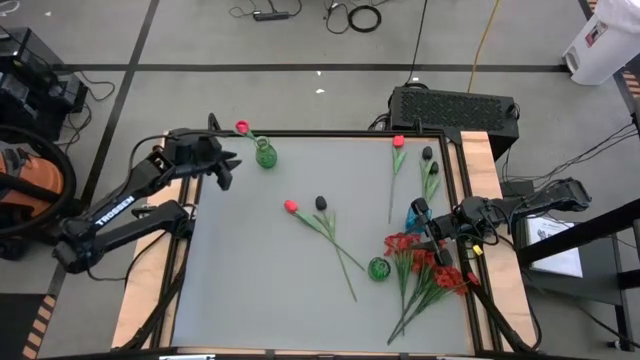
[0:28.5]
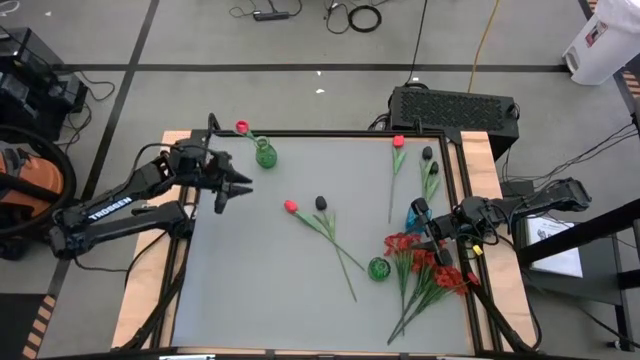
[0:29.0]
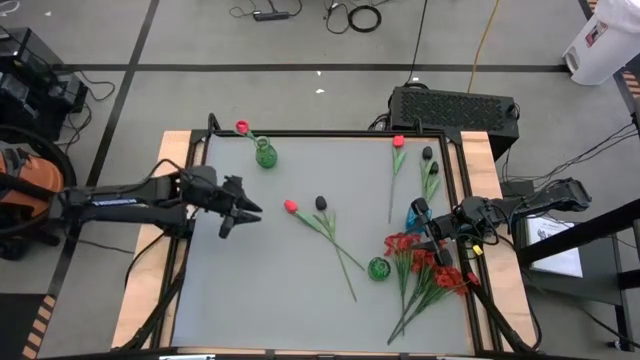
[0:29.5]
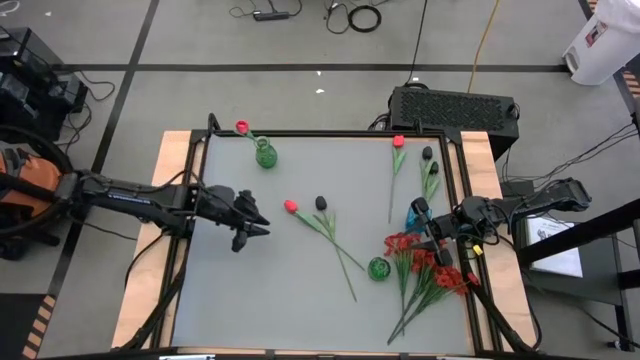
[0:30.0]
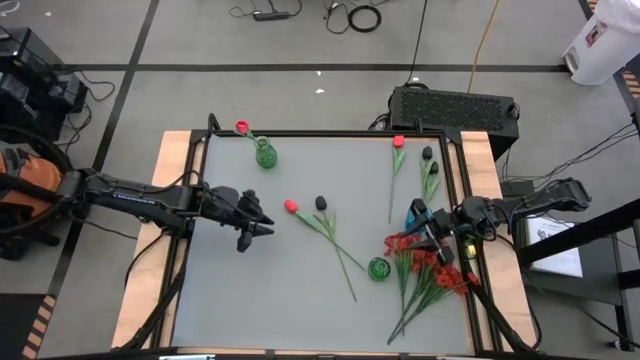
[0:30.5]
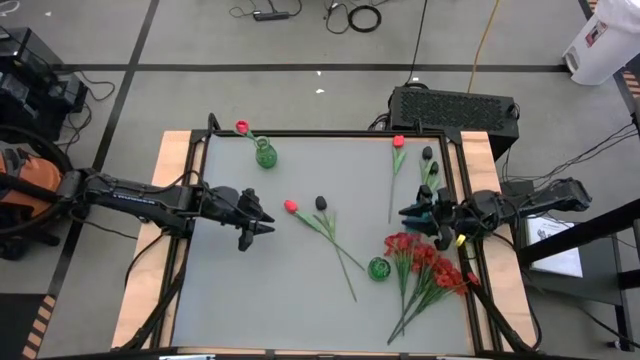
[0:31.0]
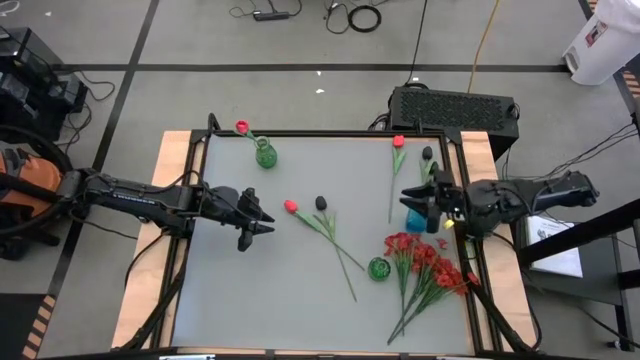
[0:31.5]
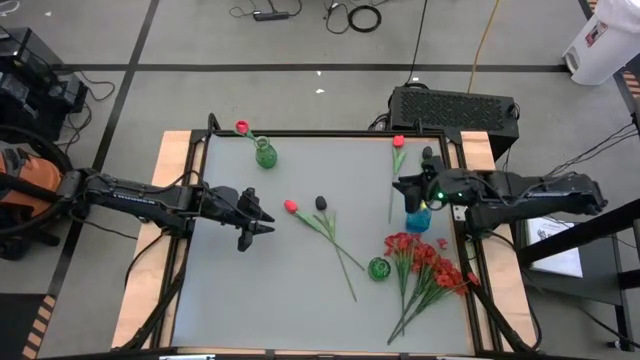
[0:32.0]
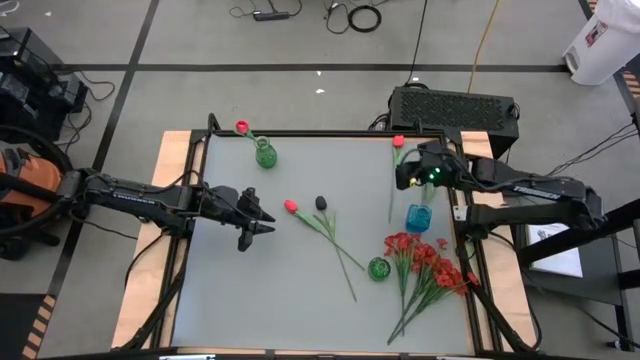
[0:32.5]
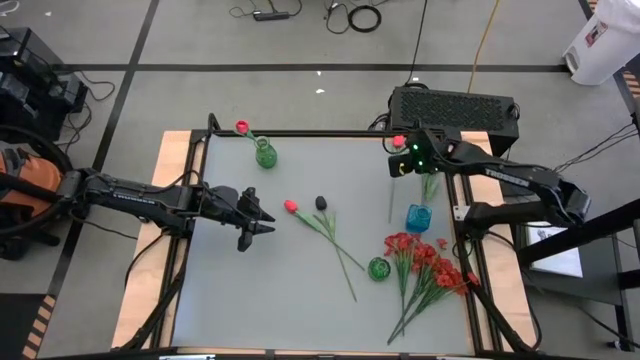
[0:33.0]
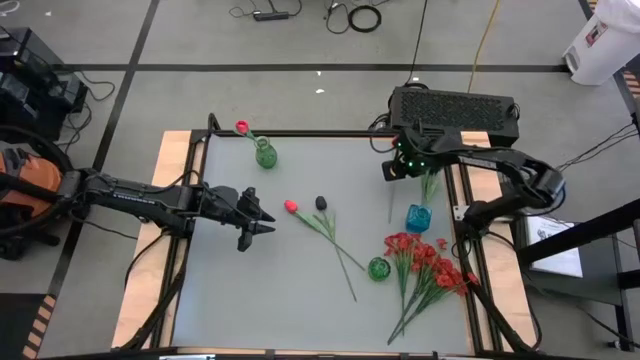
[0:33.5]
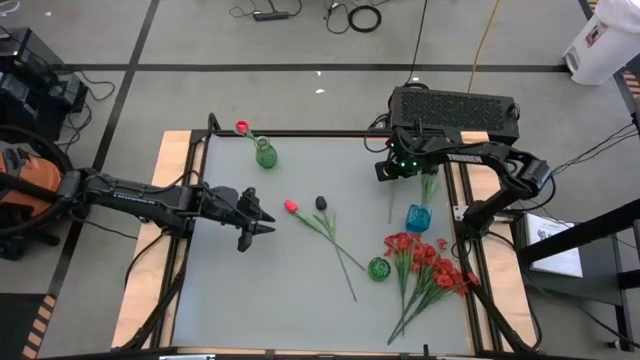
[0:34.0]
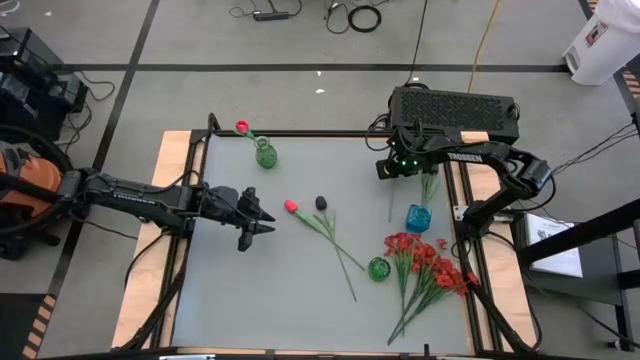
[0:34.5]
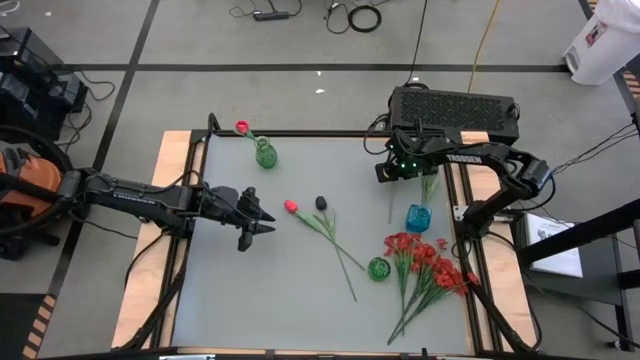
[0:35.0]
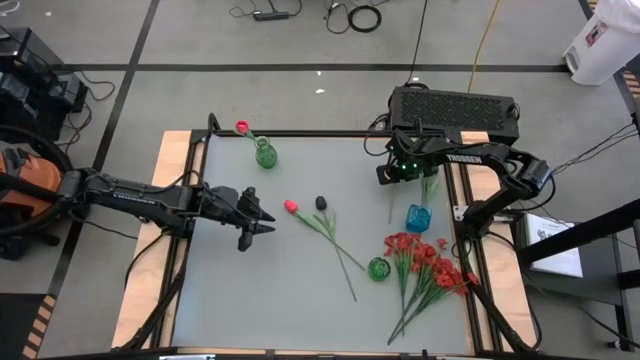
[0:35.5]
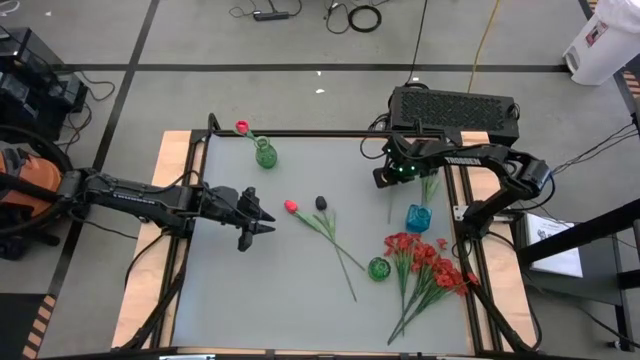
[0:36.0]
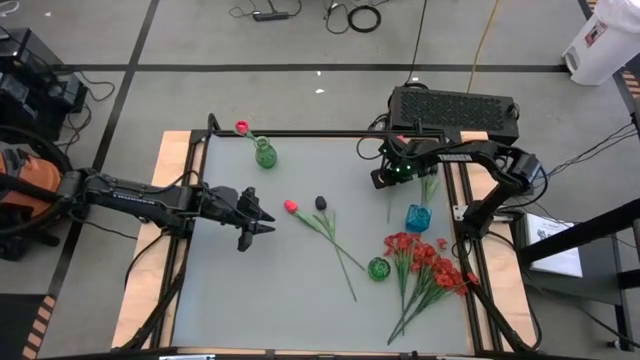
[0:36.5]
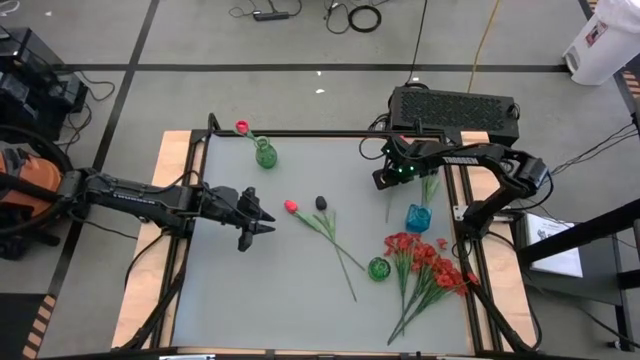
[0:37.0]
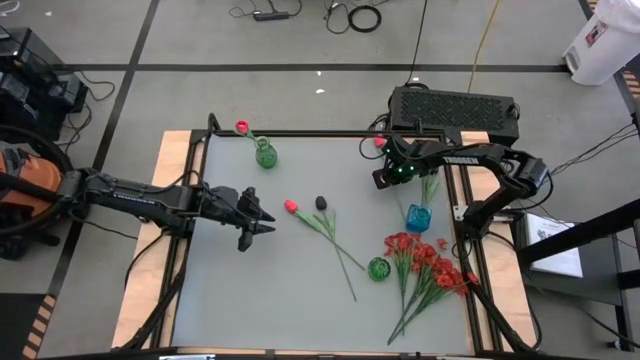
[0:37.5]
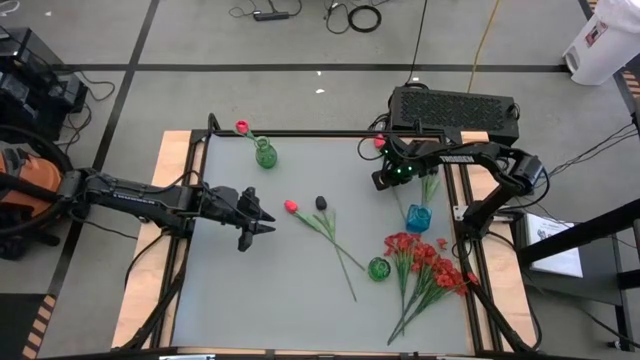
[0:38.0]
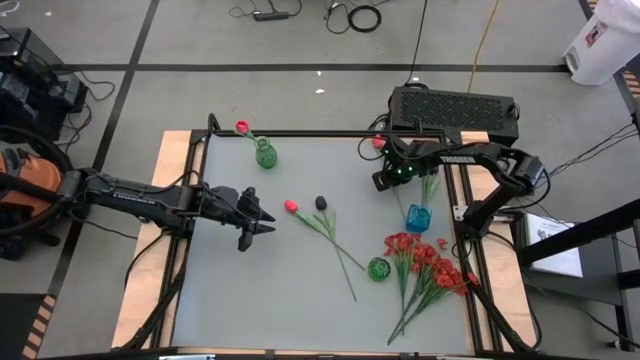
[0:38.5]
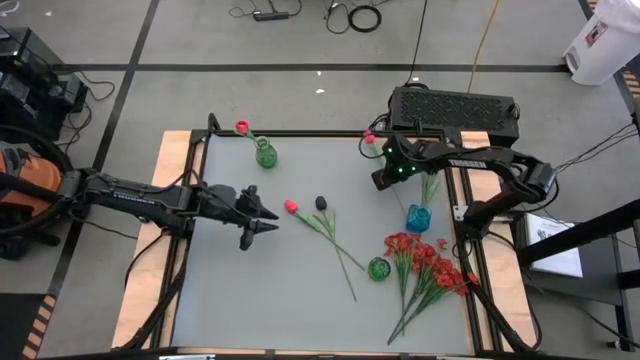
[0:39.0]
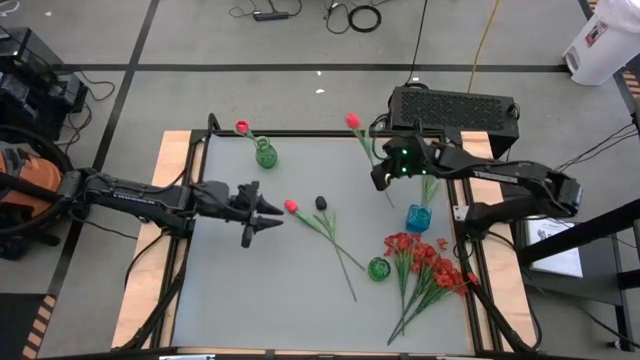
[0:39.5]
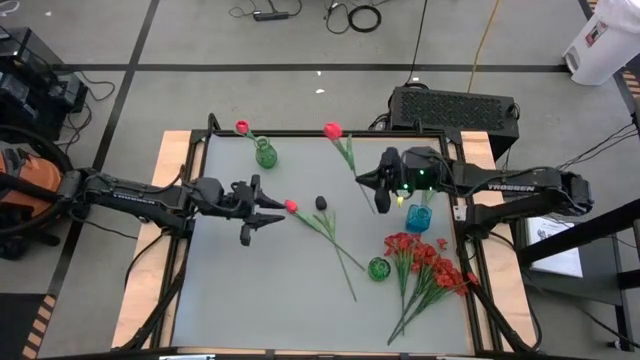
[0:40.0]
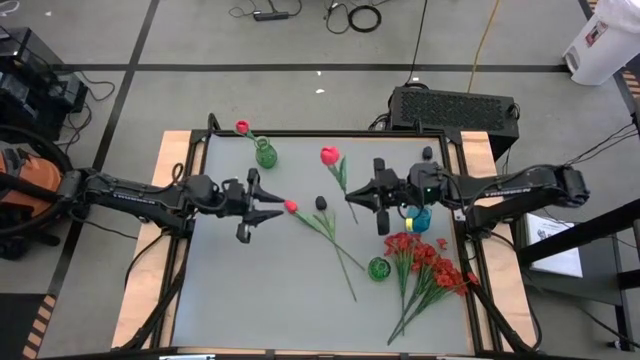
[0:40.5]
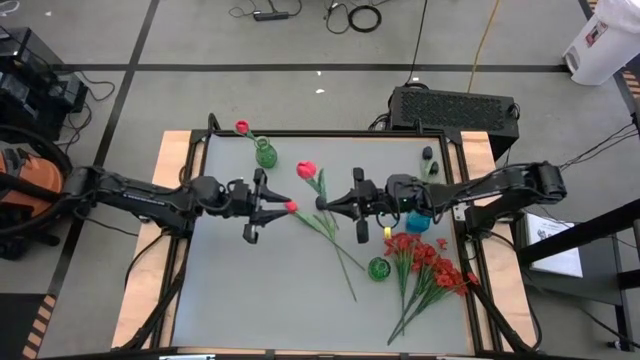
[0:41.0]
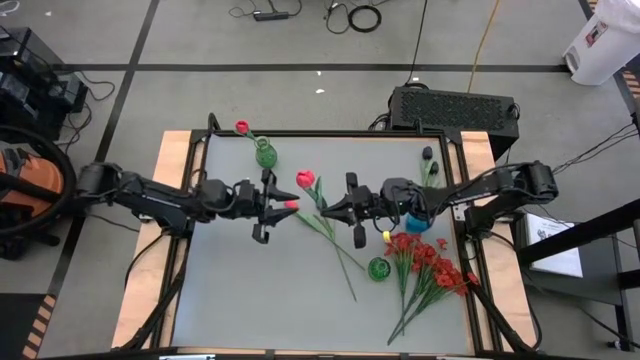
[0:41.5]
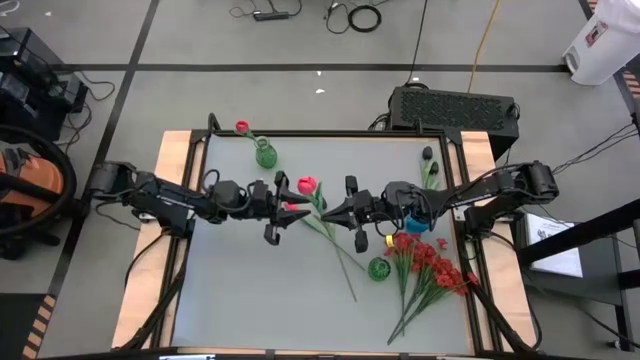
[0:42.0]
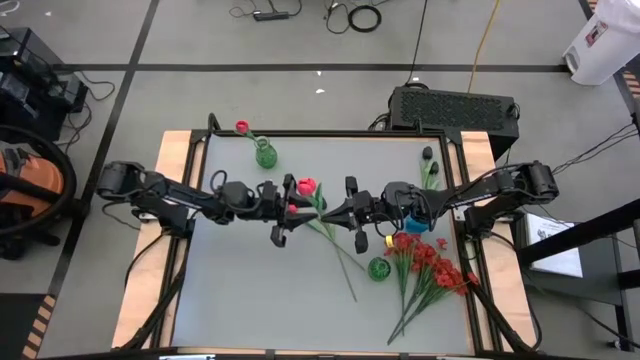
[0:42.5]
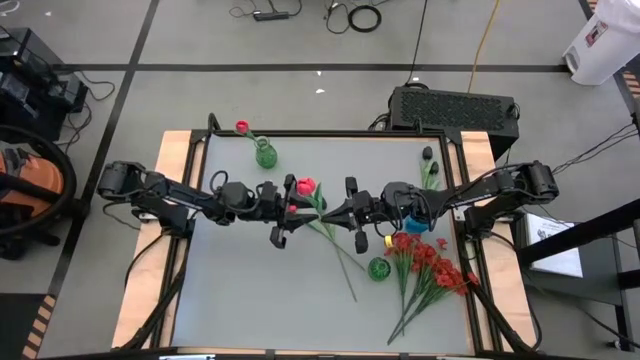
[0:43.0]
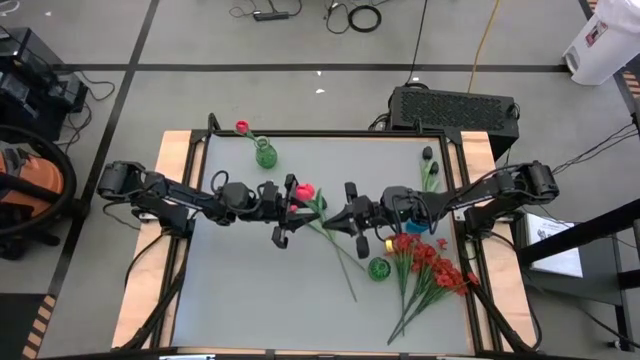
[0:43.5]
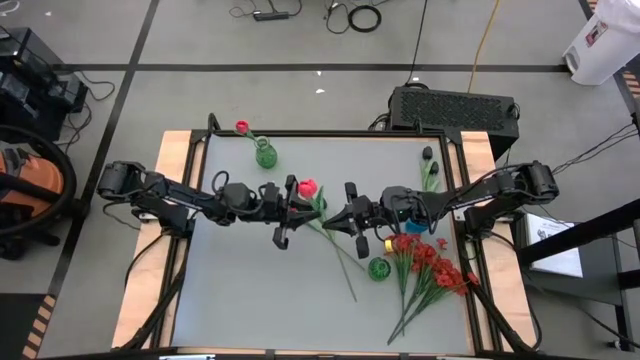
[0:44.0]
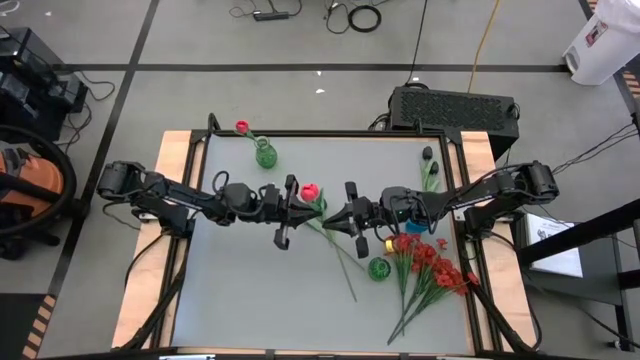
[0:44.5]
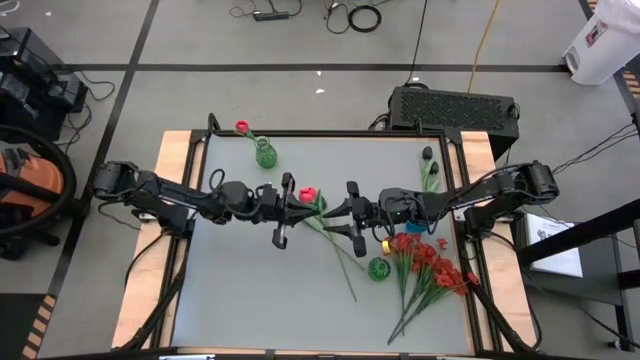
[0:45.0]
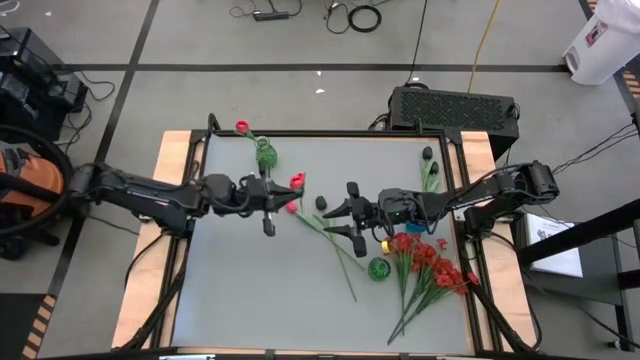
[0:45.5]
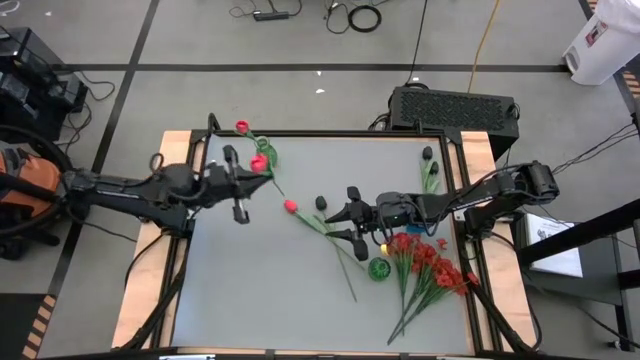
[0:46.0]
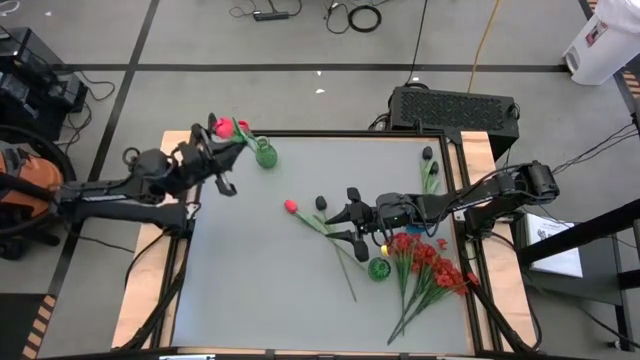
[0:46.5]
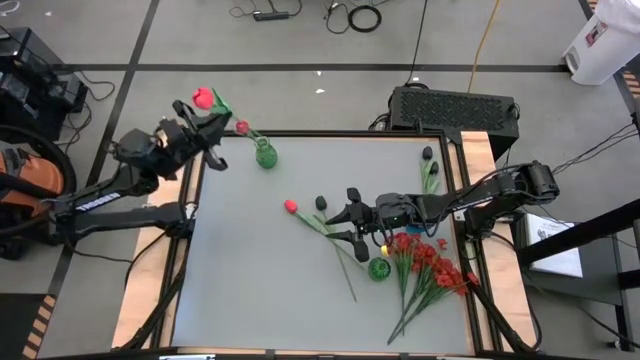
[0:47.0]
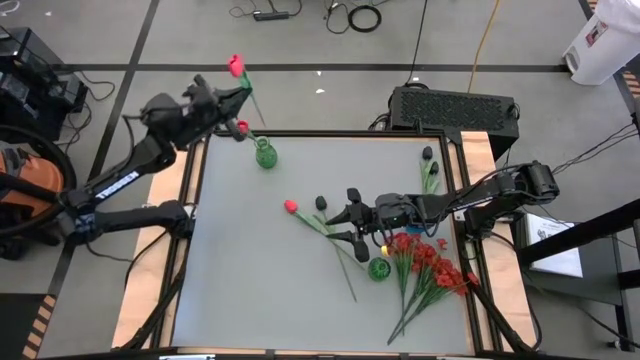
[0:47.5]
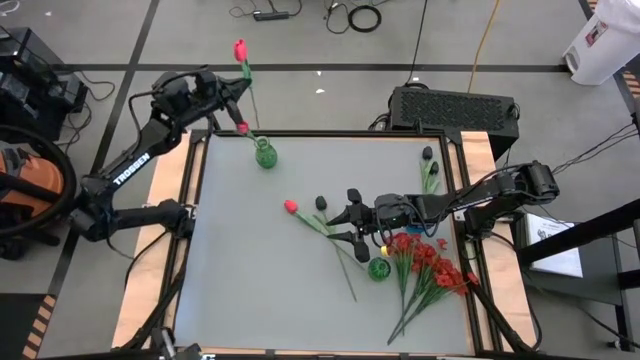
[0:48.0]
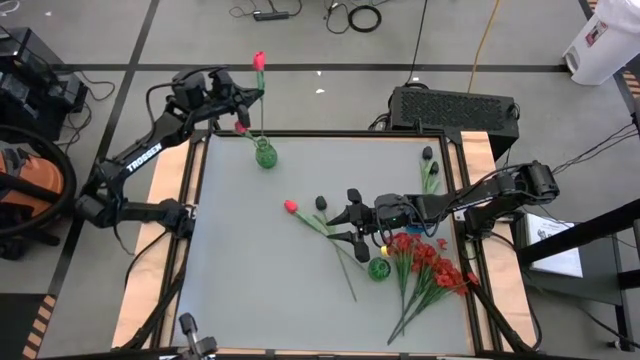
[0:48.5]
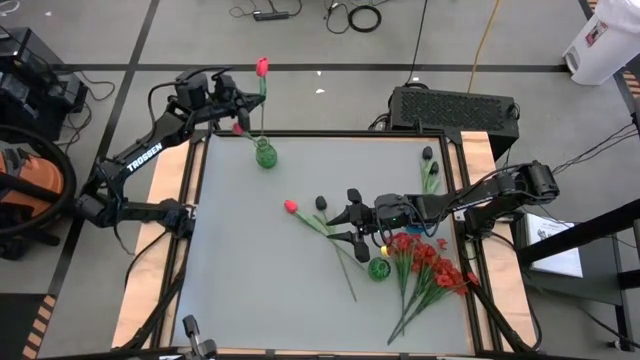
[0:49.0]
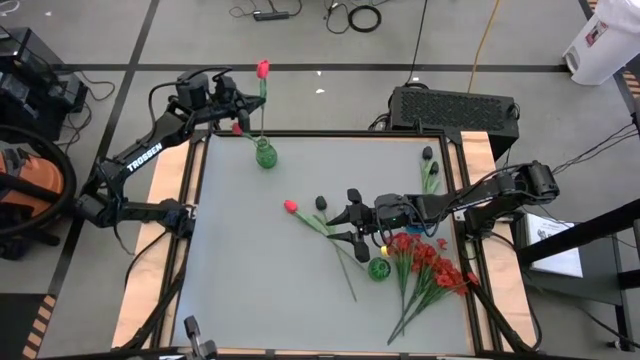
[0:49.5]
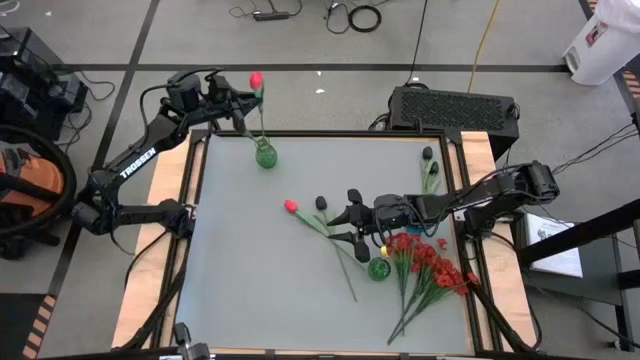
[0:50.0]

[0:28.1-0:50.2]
Task: Sort flowers into vase by color
Put the top pink flower into the top green vase
